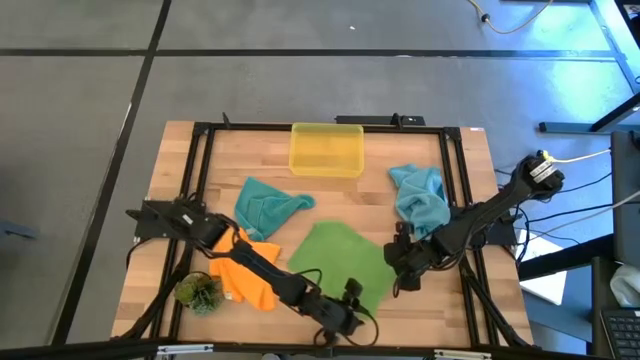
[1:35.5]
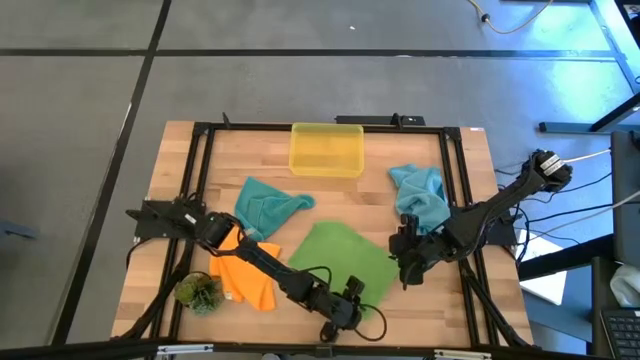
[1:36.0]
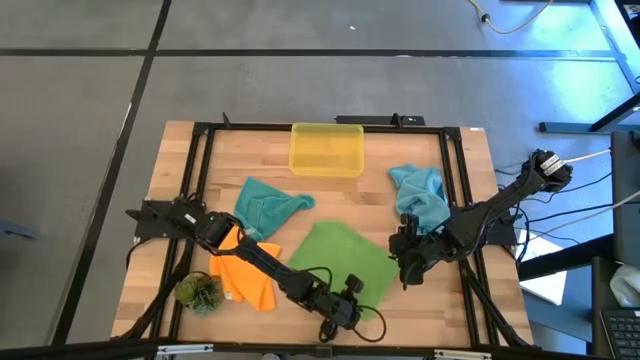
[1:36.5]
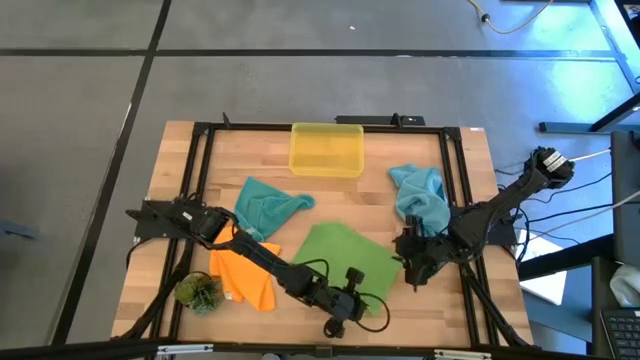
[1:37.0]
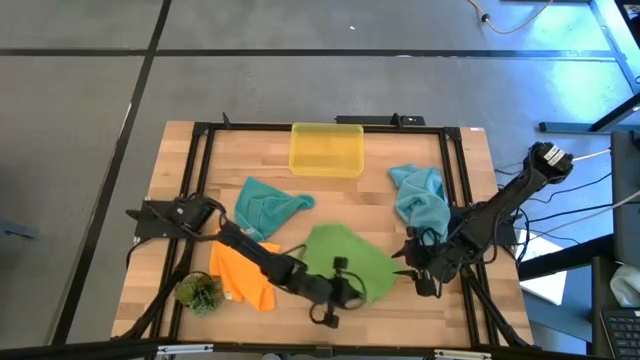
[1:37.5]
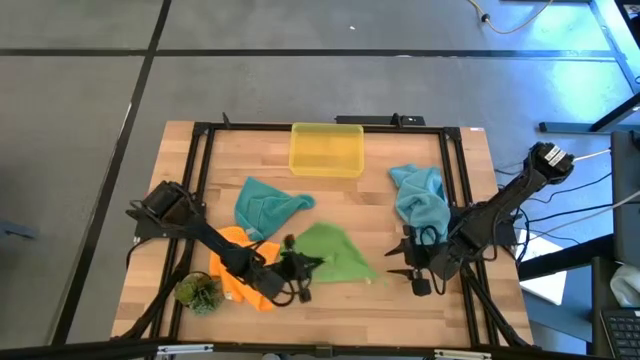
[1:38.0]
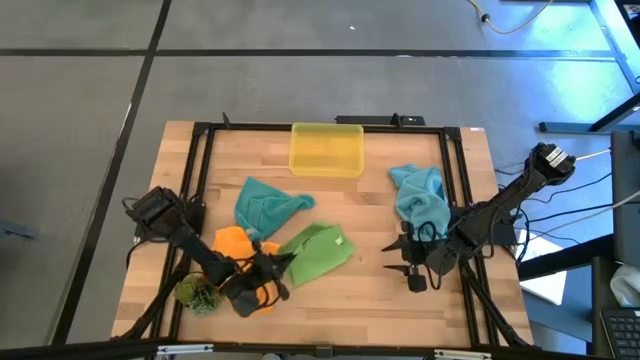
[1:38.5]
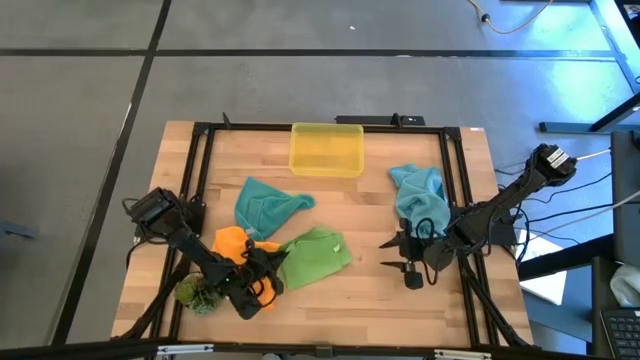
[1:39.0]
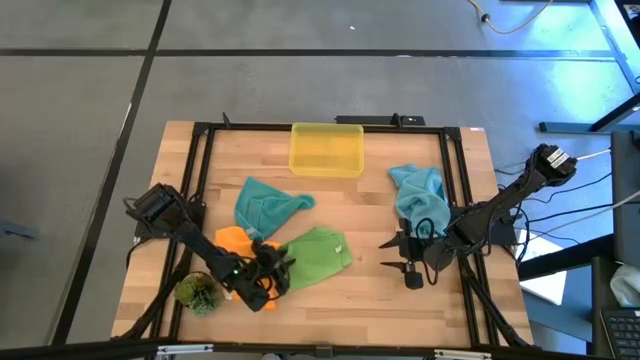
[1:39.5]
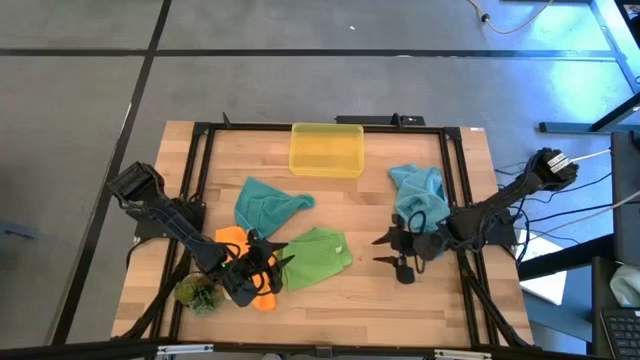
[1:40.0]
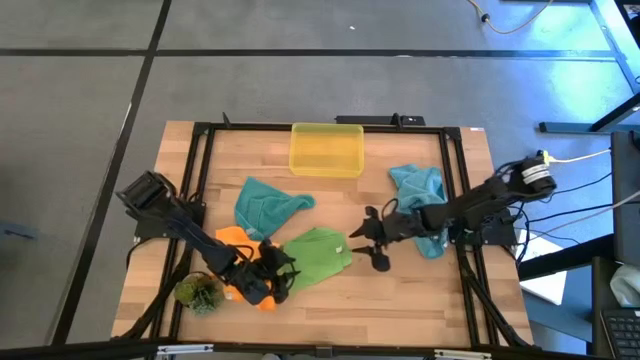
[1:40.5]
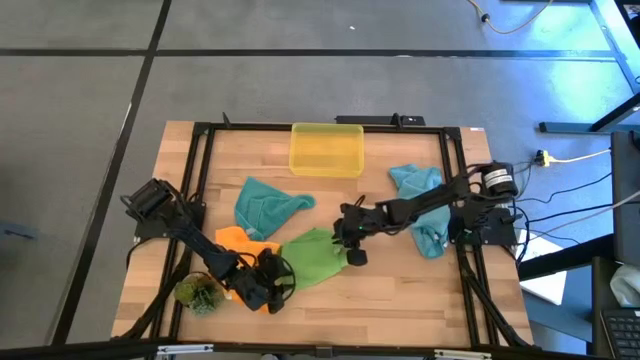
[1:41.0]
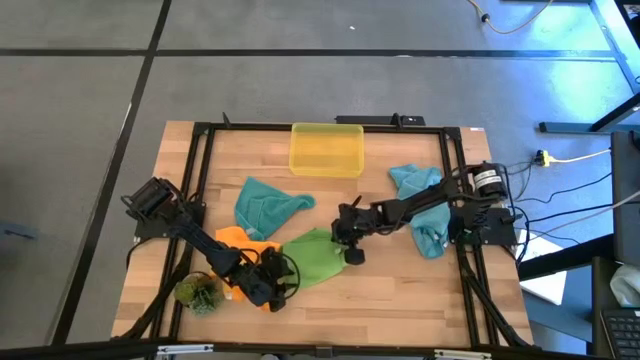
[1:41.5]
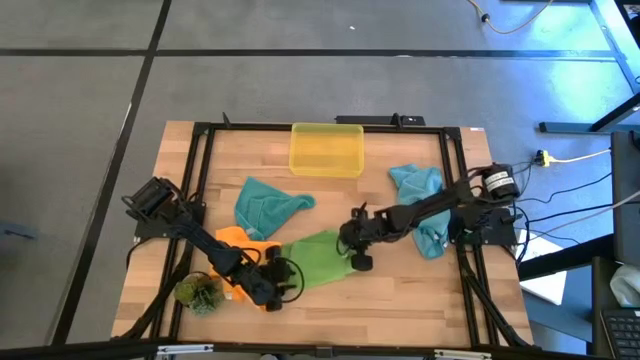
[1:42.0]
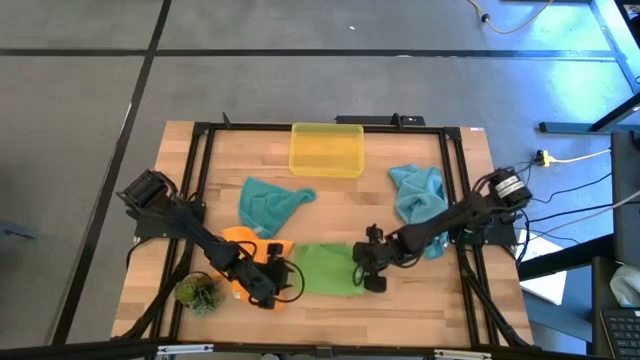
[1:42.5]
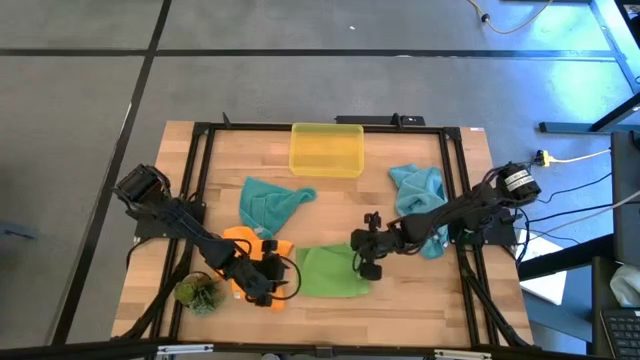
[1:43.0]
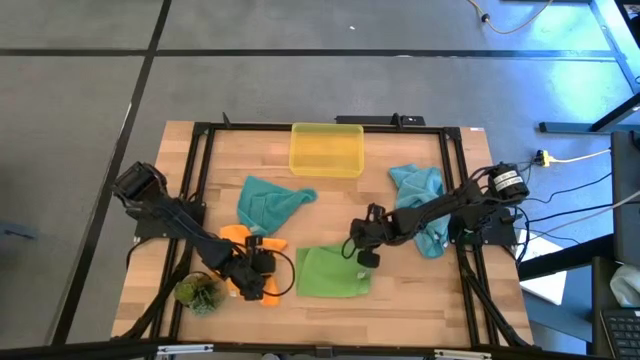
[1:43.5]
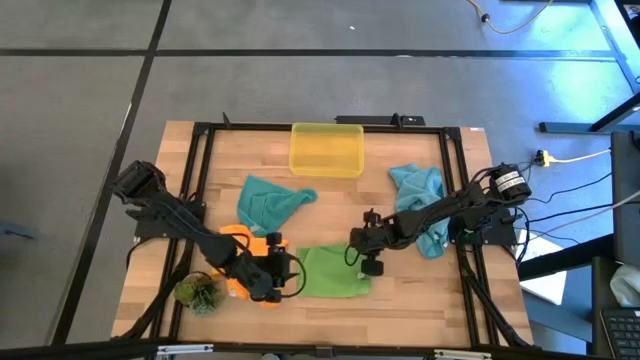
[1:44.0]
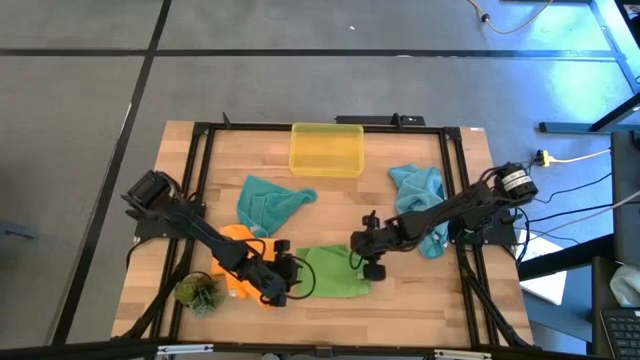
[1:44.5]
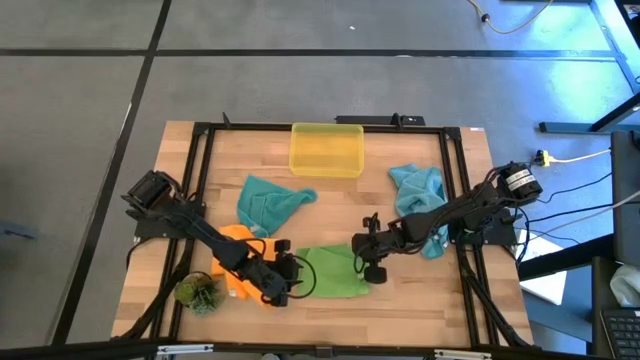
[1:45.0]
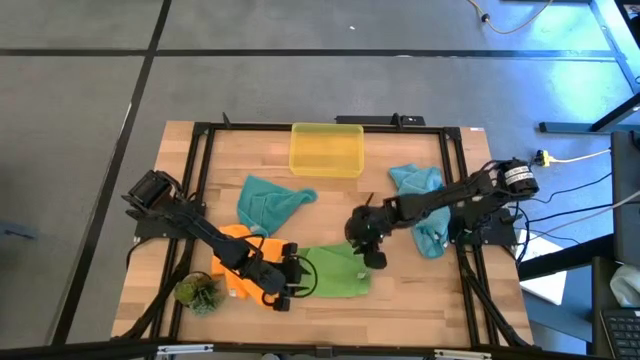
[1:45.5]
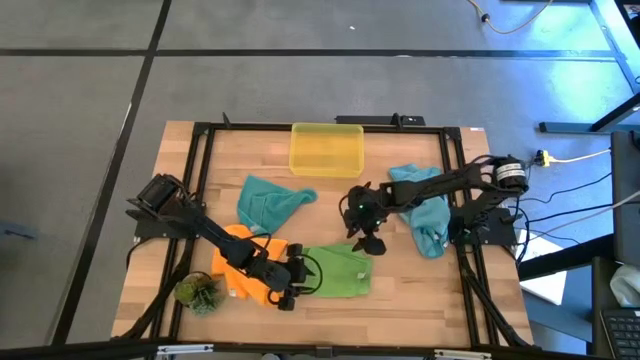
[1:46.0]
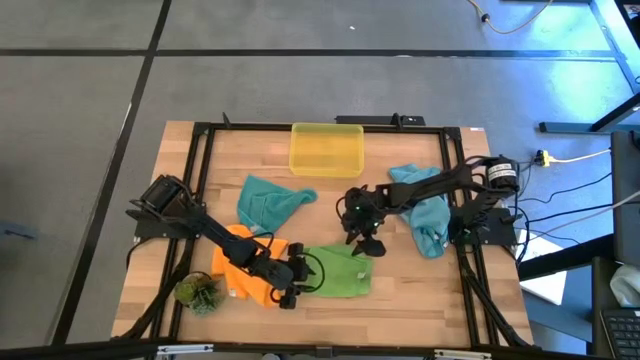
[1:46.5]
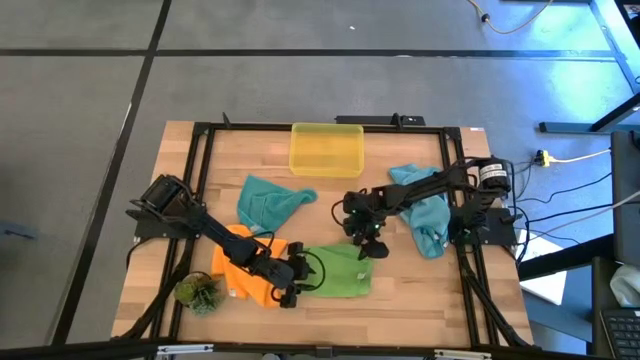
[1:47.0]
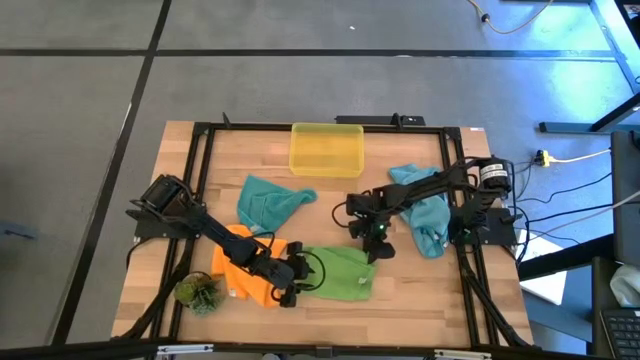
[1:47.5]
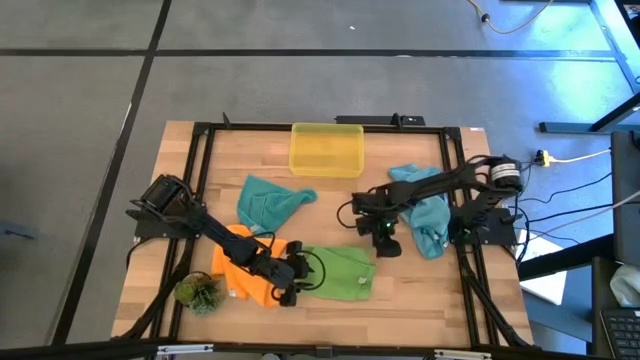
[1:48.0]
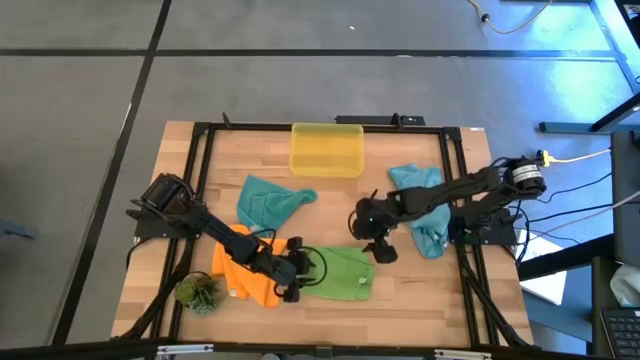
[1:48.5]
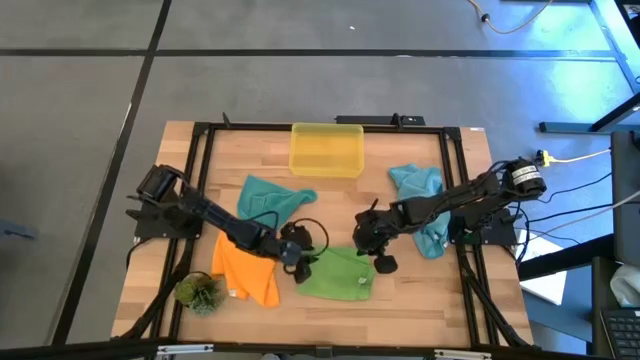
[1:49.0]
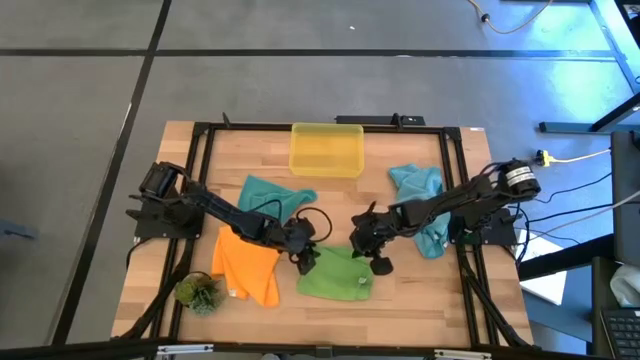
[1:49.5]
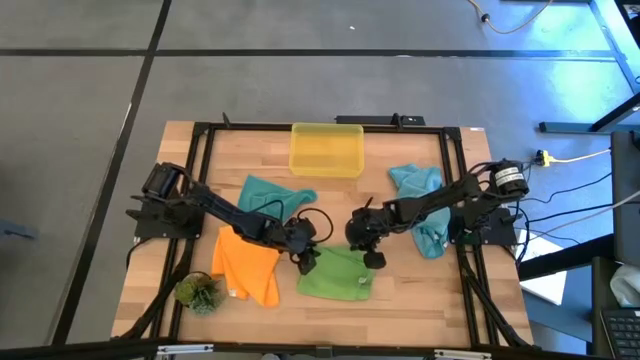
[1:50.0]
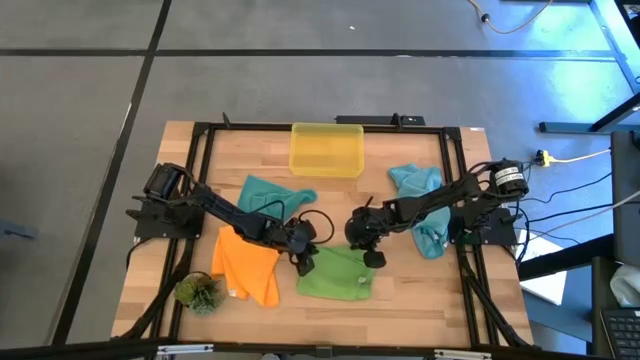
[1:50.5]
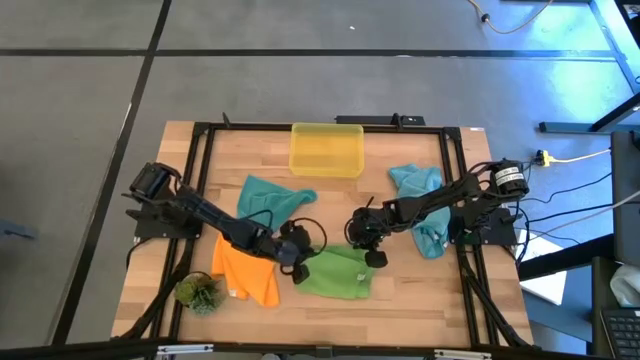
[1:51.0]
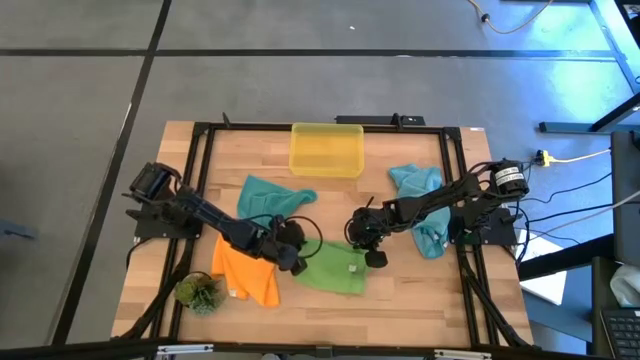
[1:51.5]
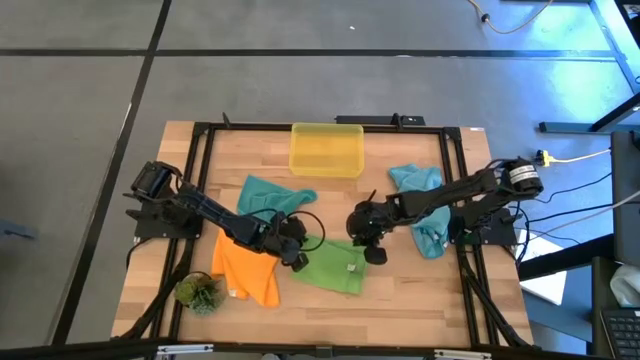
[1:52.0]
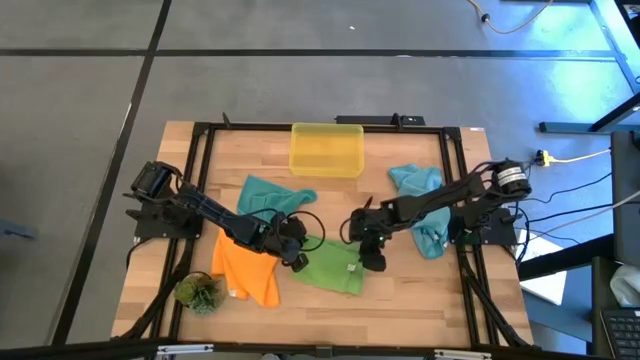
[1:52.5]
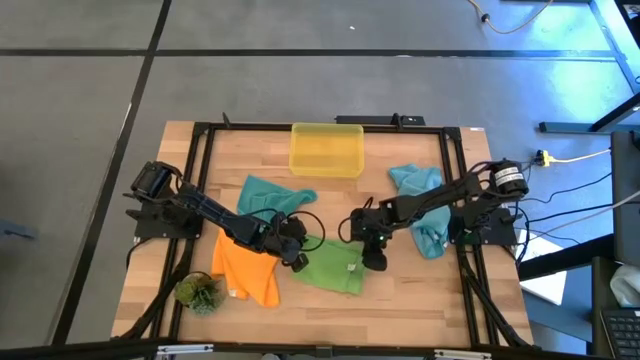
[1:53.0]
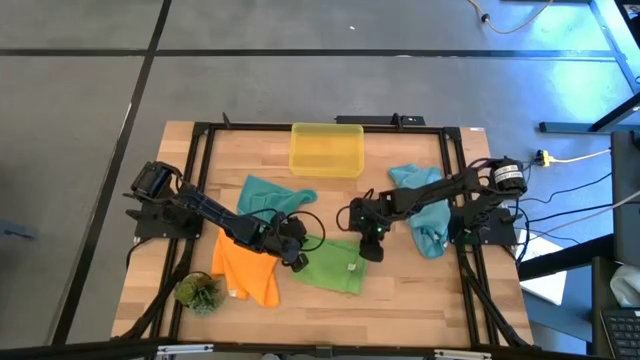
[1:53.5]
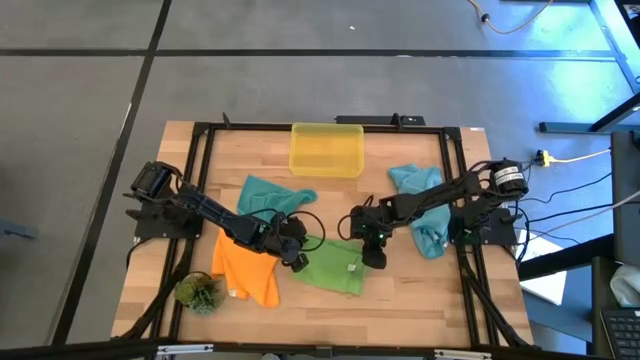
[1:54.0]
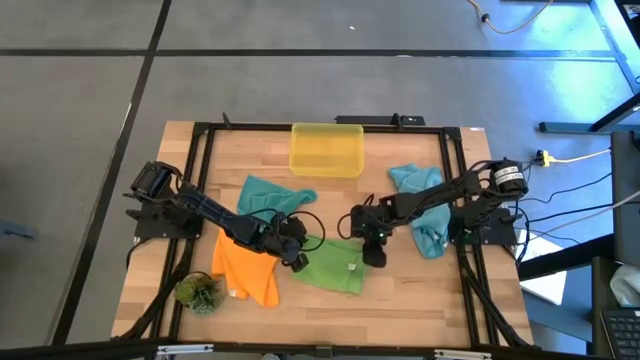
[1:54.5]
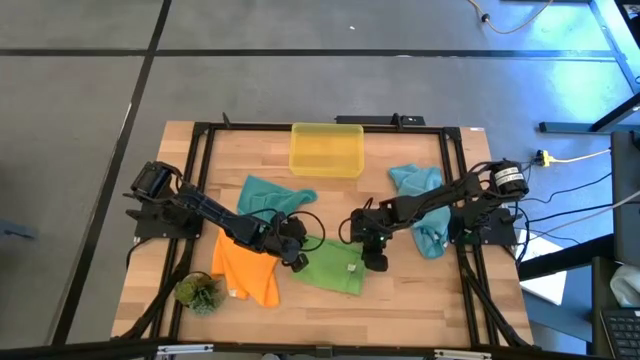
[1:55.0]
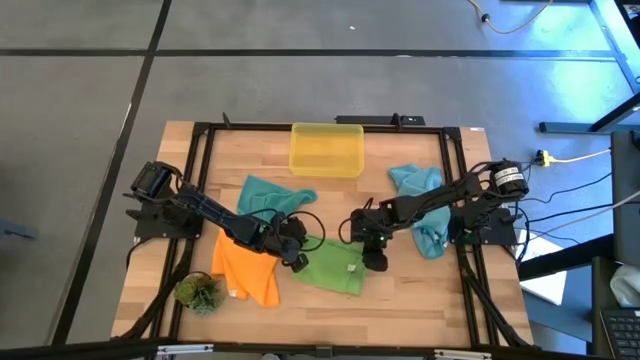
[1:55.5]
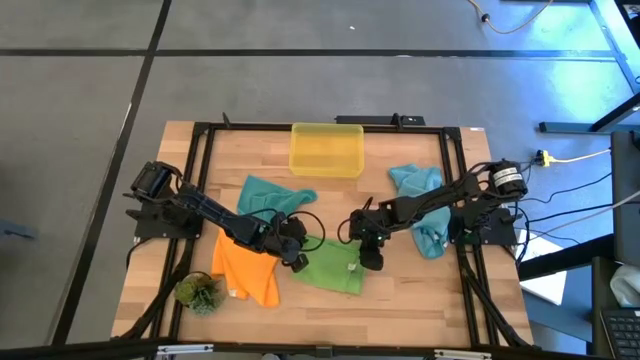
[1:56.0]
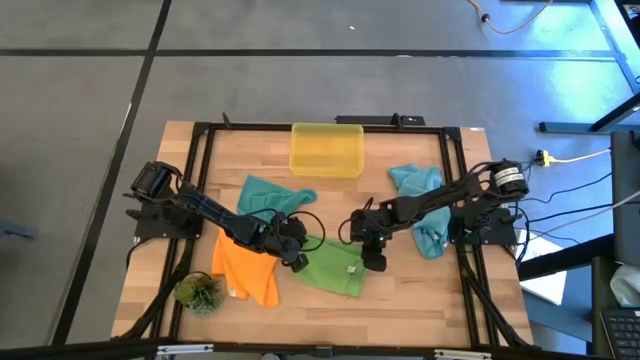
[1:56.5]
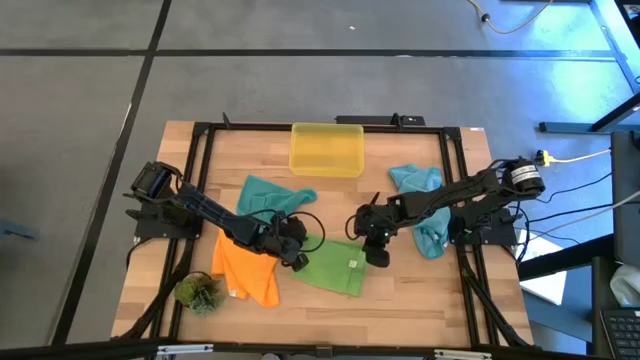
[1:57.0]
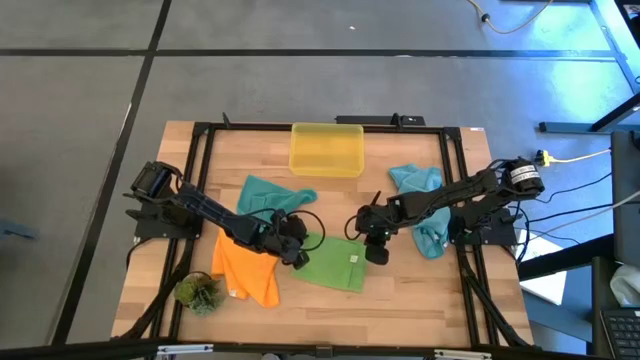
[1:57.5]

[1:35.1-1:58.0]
Task: Fold microfiber towels
Fold the green microfiber cloth
